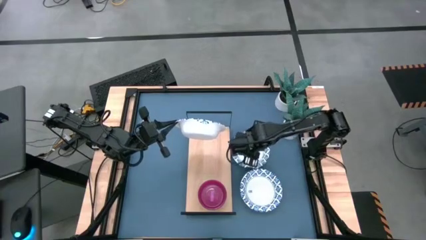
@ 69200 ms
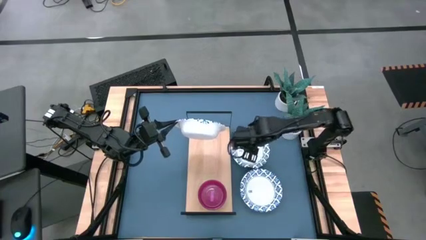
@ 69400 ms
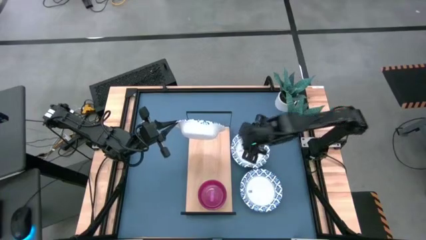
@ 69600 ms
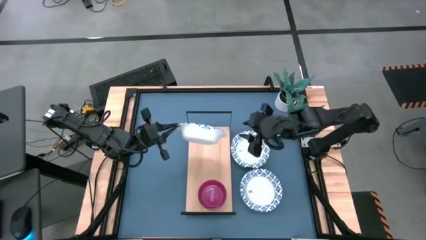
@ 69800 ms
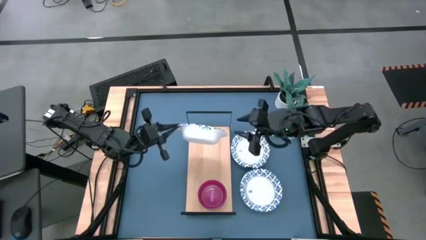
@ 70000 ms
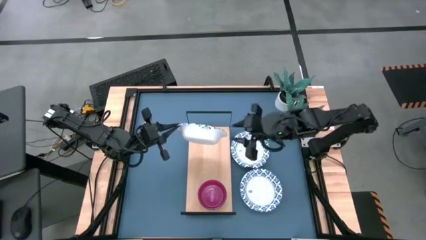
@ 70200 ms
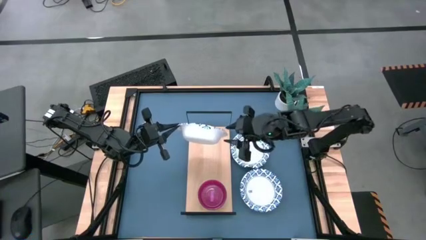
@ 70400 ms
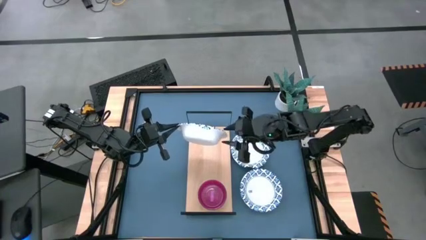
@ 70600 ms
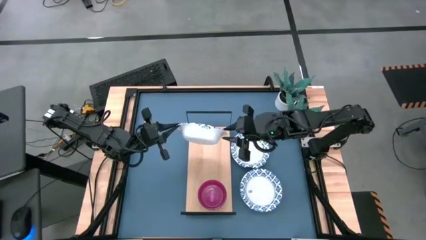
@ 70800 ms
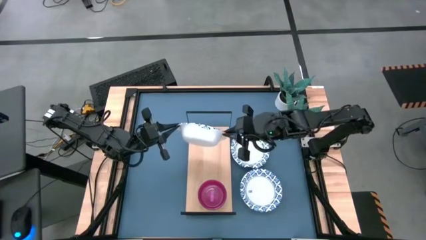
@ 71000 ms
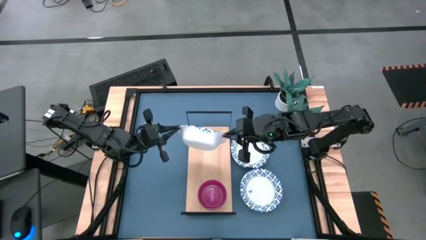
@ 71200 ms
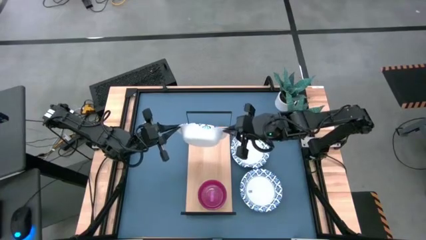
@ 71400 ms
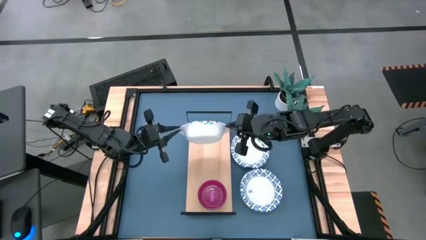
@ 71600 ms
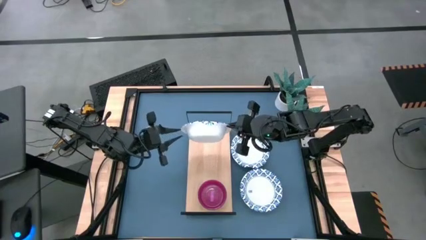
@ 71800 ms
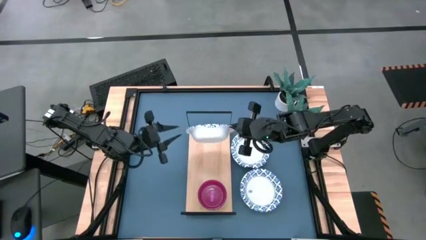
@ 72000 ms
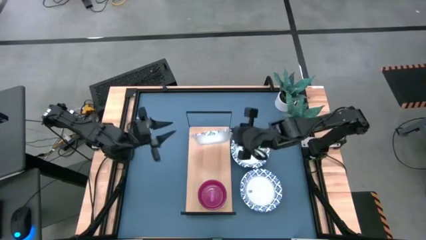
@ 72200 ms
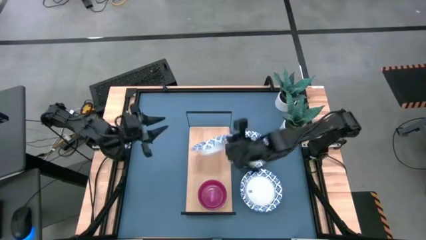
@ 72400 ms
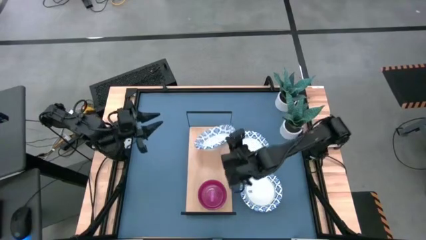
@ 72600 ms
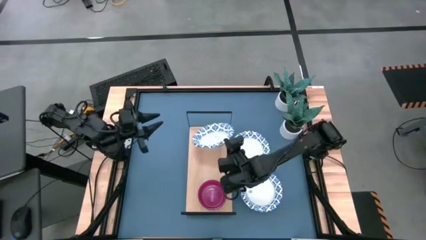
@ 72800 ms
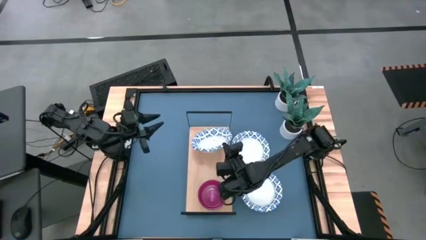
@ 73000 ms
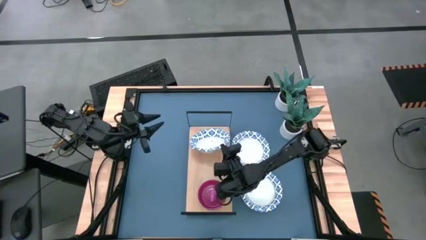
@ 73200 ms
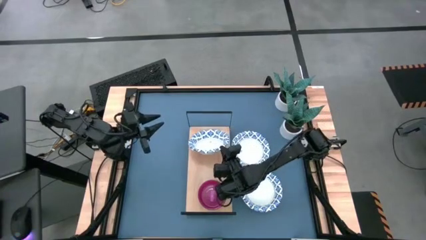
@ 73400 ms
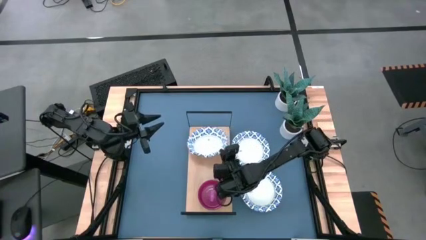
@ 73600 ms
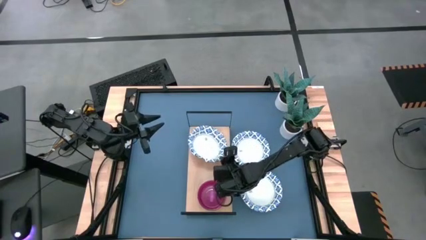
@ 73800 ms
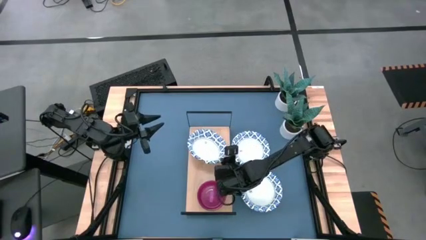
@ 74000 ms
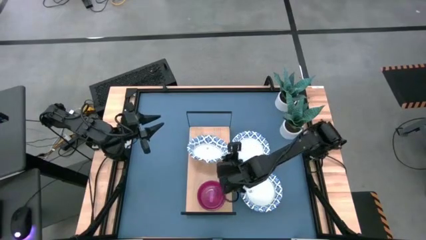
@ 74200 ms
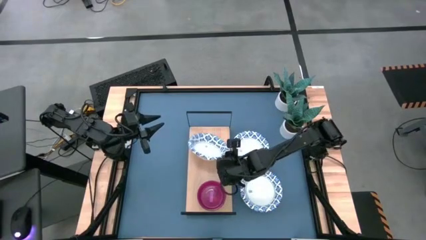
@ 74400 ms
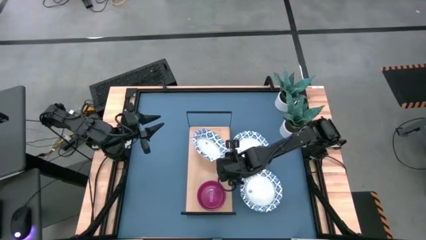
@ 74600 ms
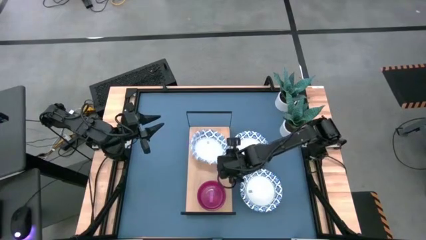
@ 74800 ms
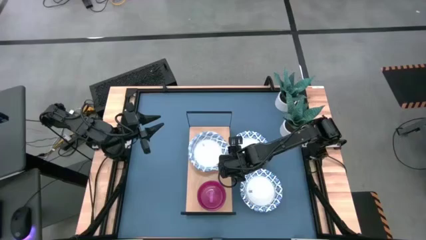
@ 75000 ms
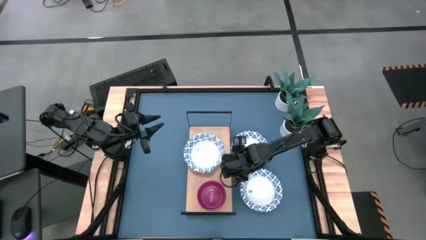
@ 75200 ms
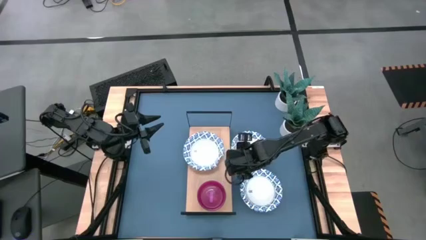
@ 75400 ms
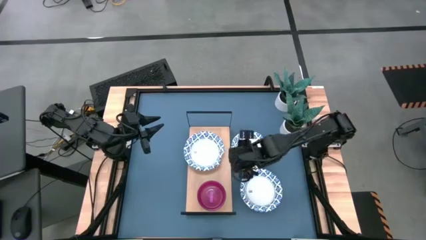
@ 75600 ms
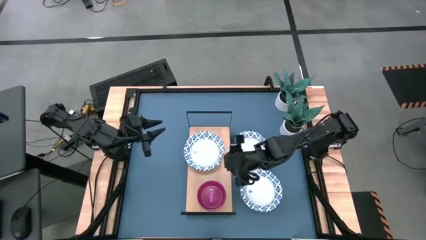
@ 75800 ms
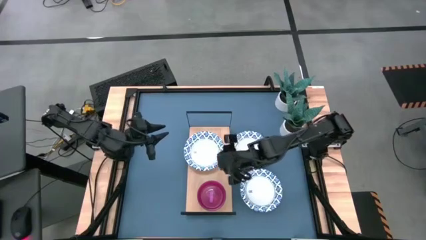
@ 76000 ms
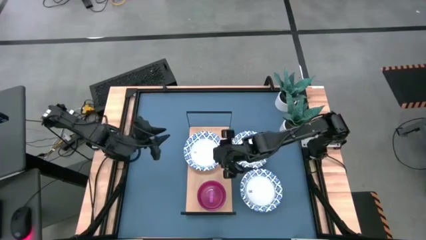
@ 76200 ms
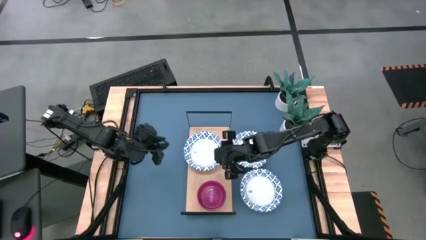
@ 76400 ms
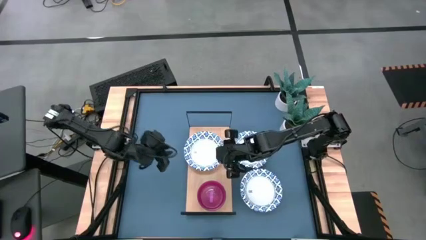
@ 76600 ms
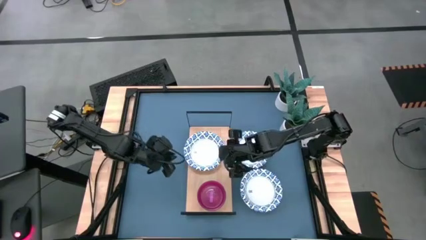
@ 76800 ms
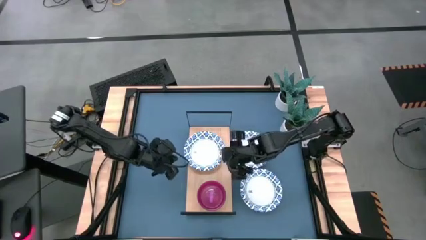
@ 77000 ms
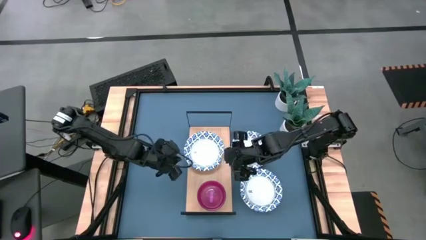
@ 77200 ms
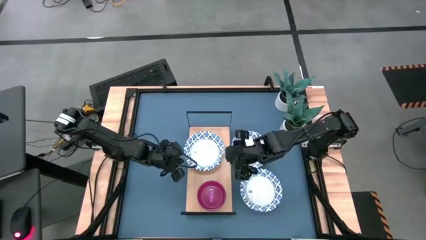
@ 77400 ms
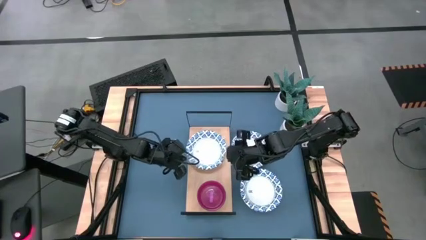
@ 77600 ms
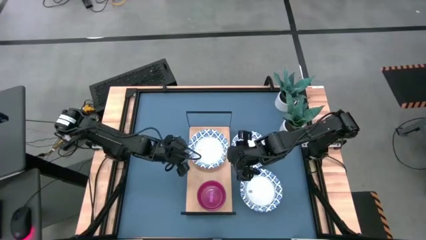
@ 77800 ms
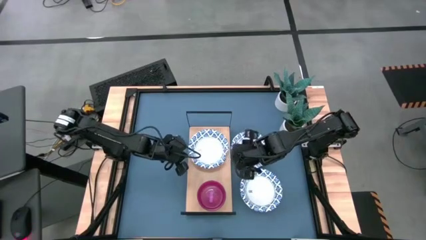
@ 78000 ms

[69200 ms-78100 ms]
Task: Place and stack bowls onto a shelf
Put the left white bowl on the shelf

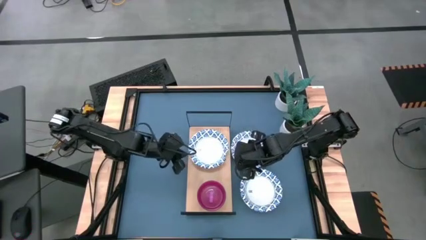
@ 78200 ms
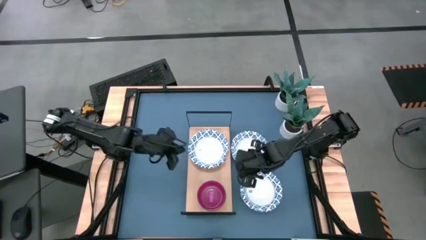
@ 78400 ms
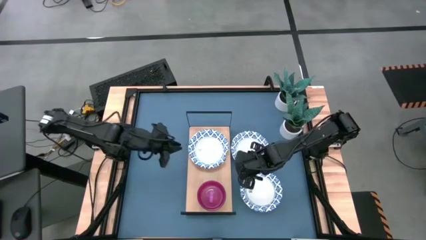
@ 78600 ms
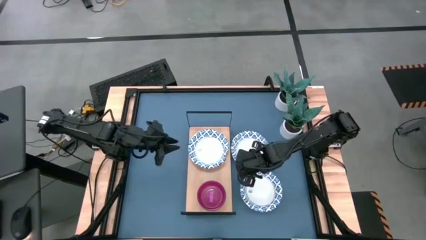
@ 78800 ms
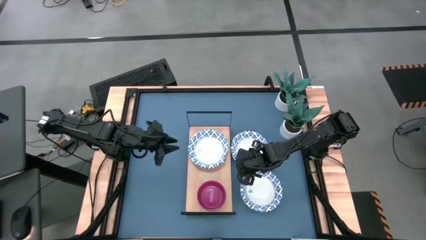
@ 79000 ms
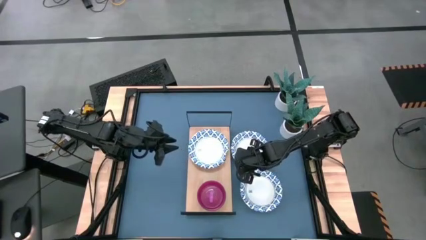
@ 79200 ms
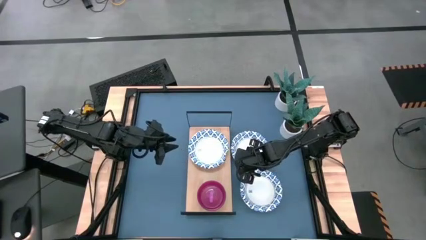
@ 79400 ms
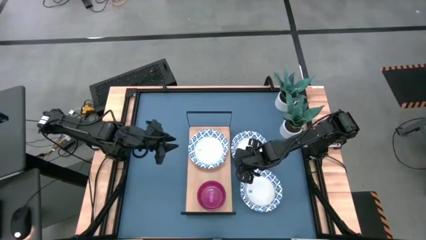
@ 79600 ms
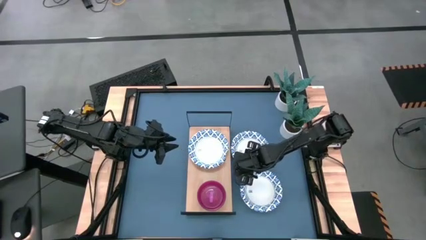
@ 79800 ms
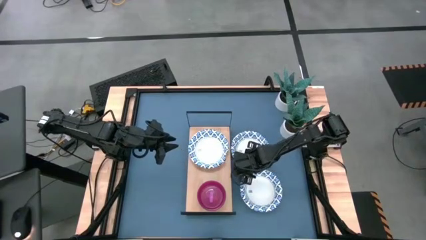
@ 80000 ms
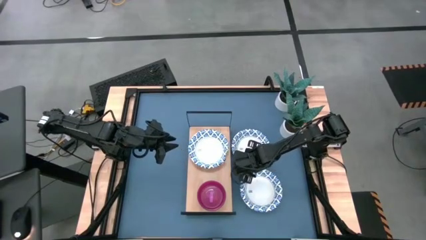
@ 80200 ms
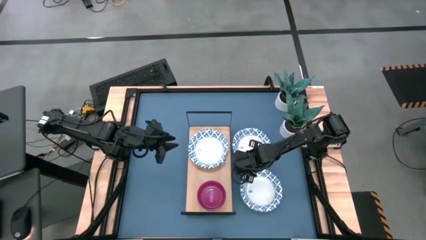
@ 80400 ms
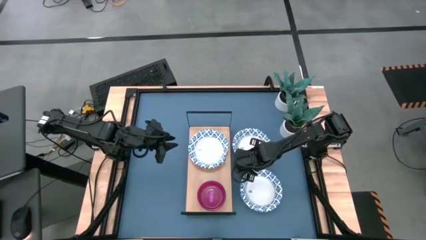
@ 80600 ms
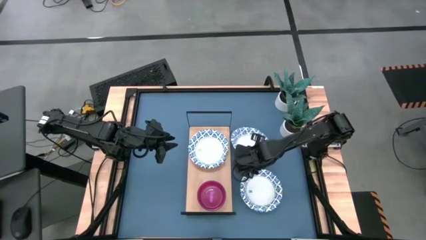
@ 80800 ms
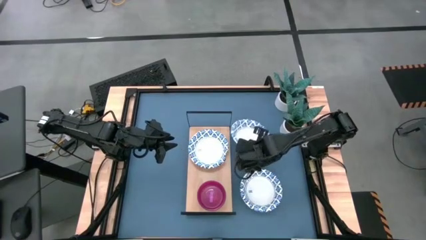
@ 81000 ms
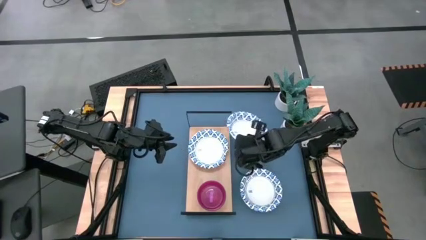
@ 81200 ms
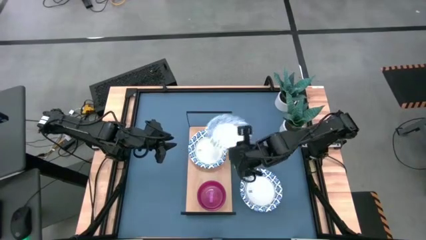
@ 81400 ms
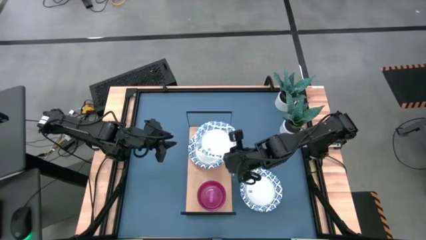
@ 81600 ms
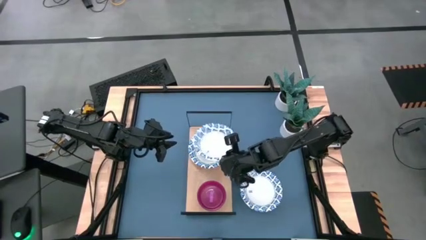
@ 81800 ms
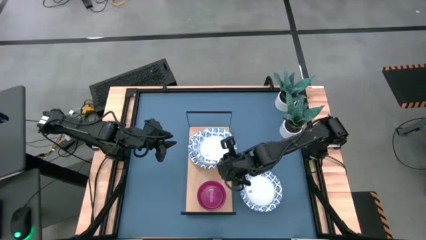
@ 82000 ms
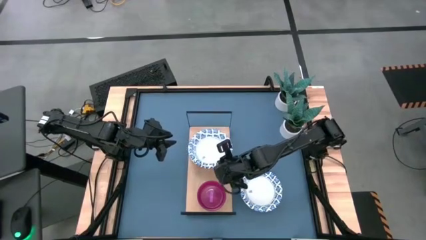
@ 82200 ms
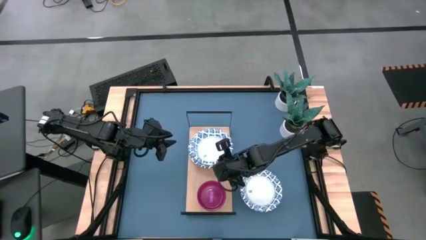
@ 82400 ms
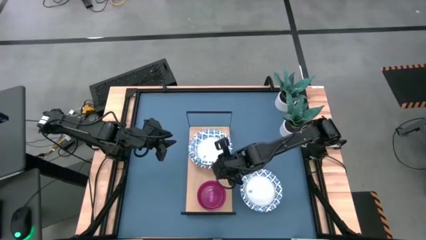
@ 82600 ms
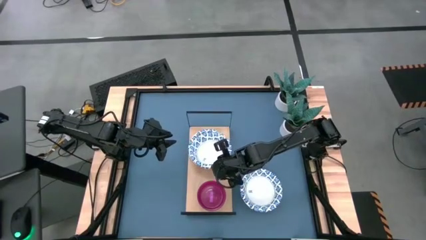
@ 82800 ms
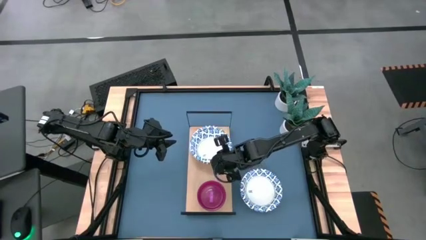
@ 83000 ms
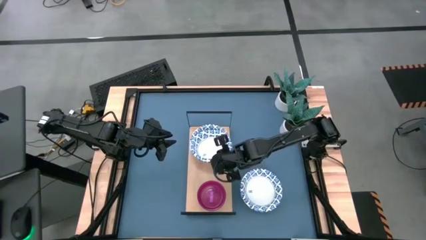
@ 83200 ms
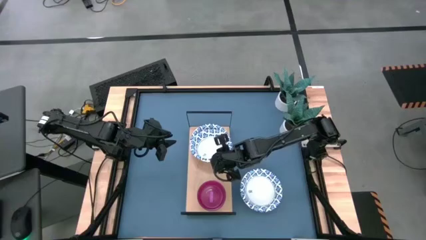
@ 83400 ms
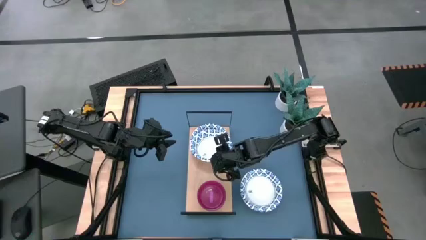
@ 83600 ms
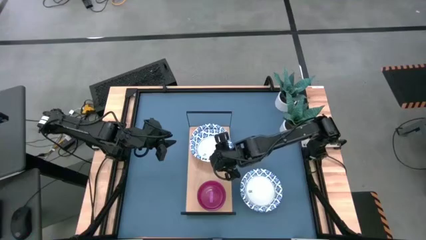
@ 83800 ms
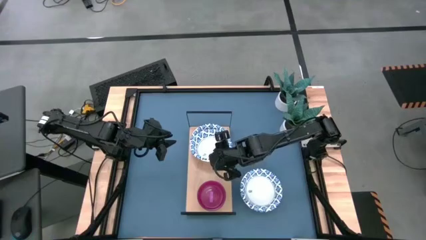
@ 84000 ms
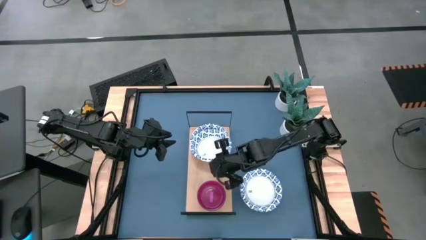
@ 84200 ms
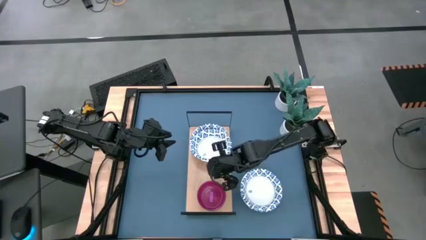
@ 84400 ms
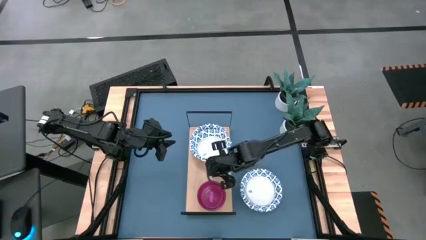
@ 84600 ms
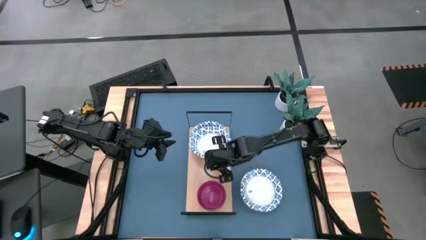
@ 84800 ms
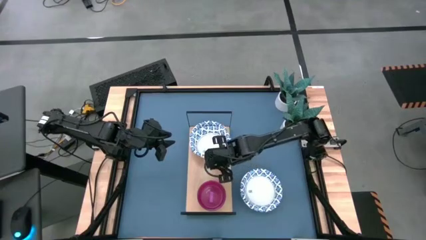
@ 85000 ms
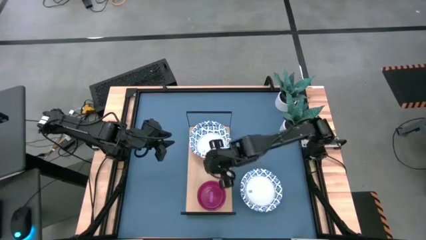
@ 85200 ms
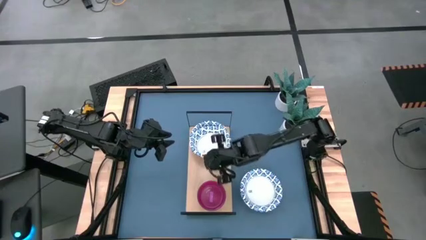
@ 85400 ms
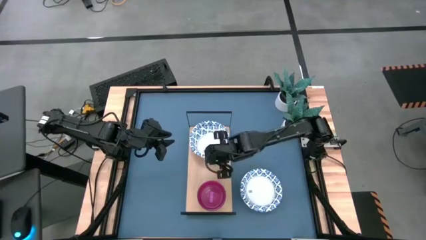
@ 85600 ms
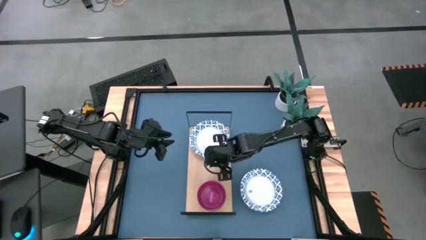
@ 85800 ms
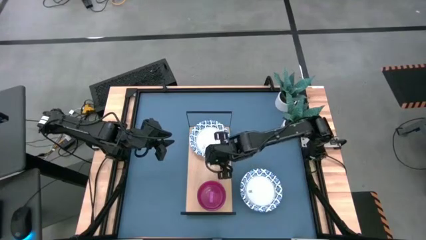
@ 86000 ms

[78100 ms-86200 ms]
Stack the top white bowl on top of the white bowl on the shelf
